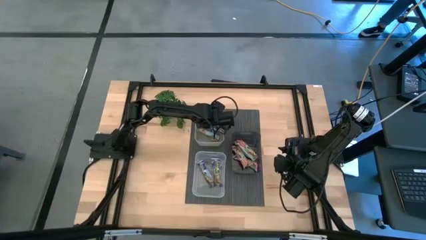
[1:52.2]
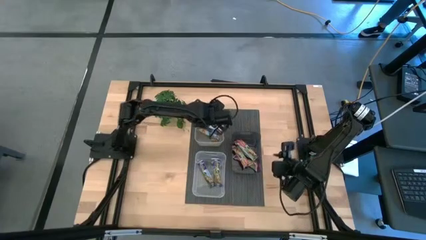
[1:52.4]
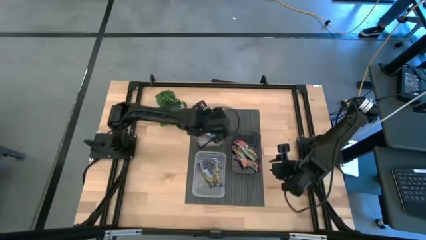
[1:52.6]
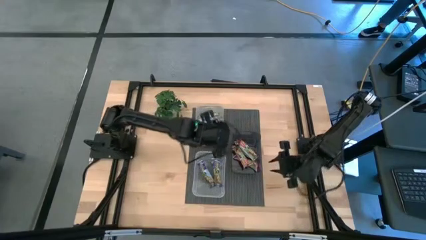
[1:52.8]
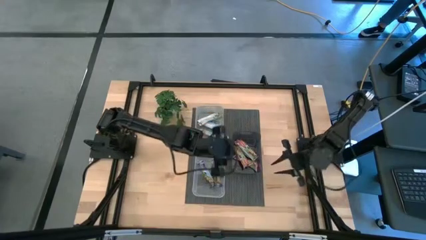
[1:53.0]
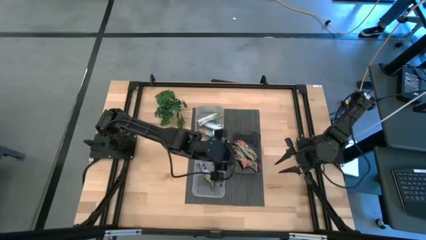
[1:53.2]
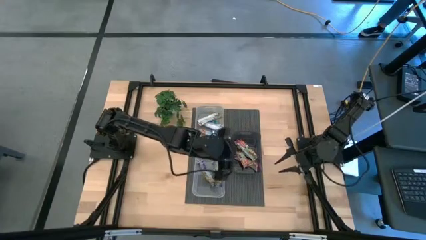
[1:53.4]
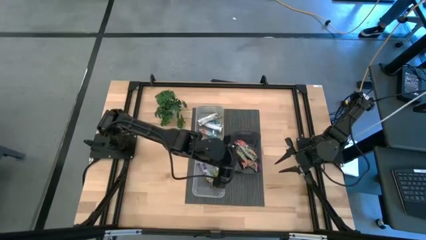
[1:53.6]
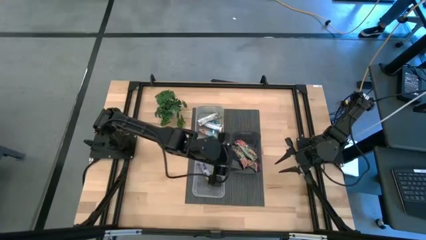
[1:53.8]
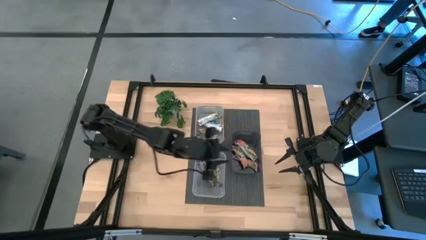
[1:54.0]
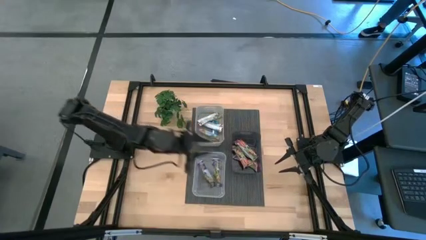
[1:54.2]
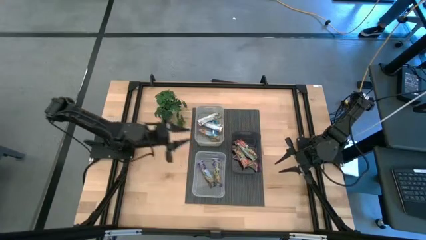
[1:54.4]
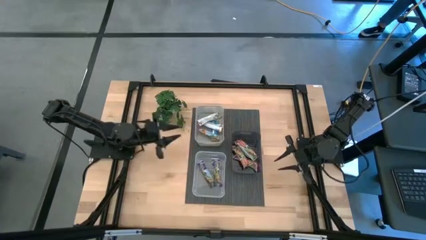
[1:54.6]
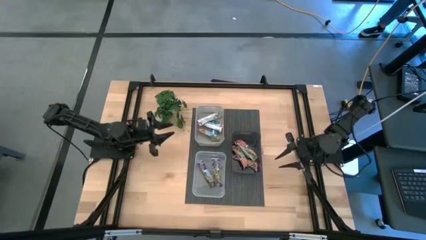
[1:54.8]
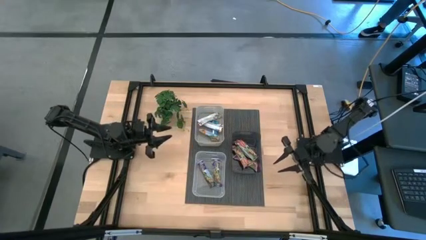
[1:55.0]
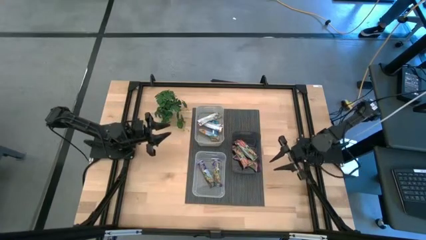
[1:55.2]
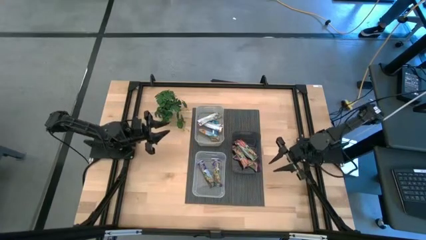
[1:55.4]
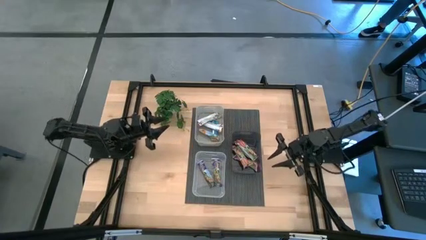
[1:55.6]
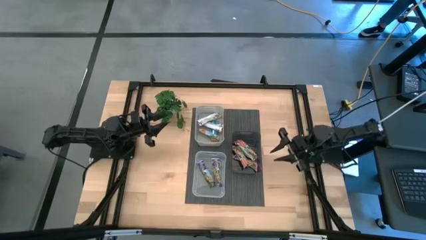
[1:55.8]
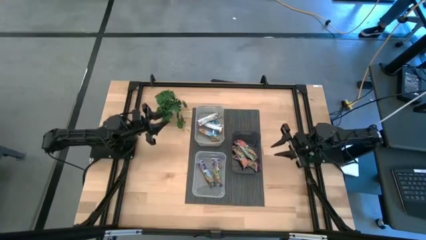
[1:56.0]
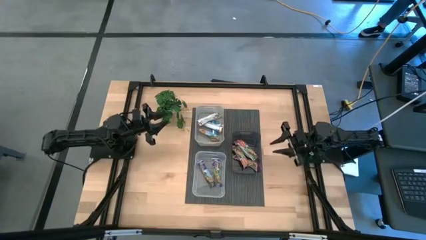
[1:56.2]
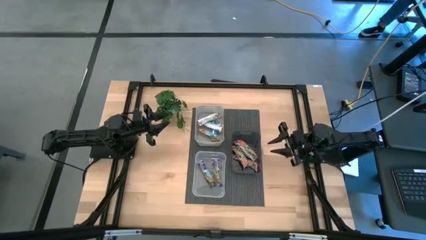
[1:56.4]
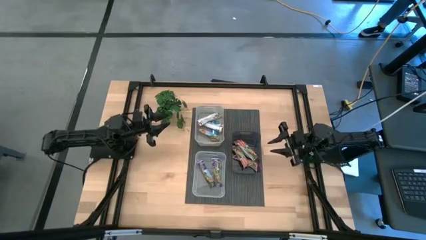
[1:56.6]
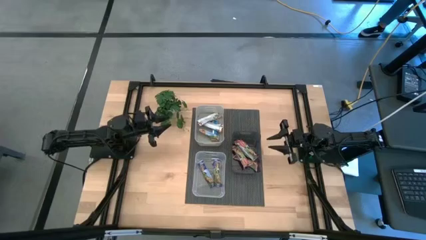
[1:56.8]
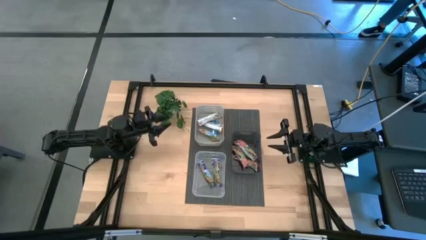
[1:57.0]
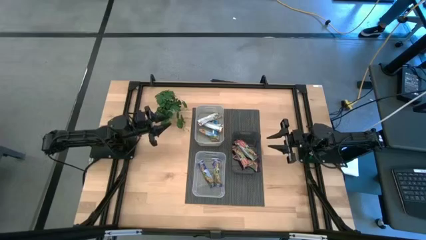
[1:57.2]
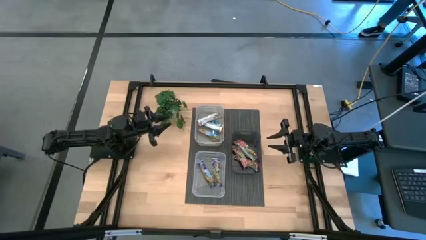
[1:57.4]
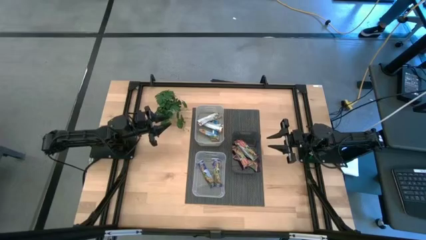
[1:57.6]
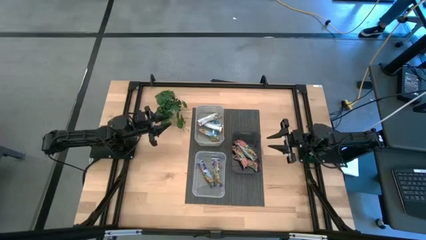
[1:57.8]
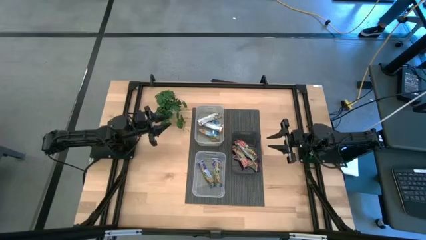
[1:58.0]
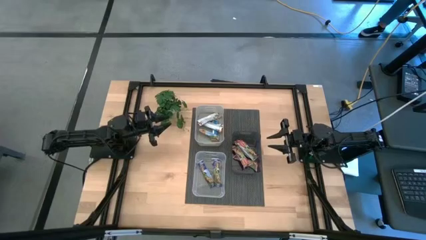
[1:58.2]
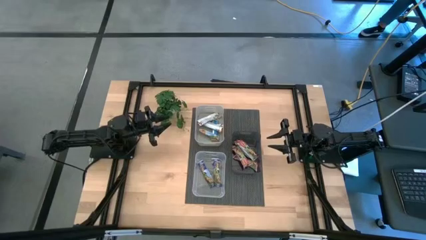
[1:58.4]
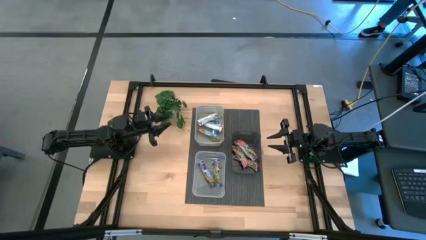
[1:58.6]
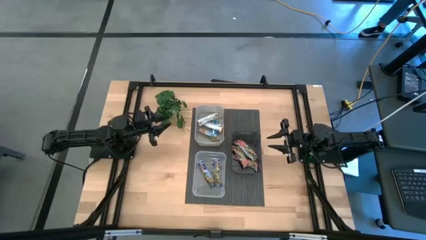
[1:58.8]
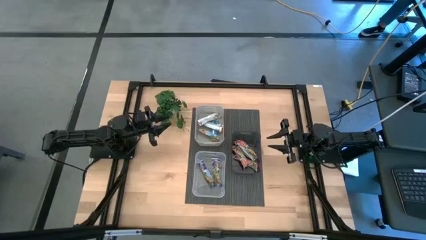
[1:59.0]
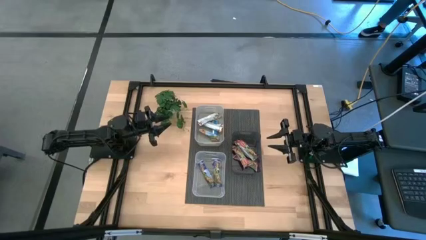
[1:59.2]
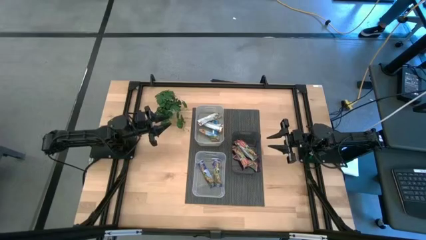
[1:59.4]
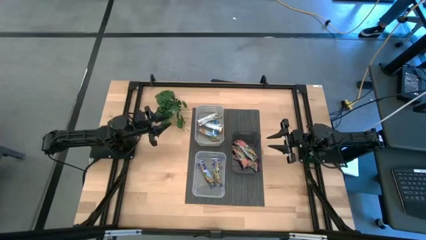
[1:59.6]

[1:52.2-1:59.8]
Task: Pick and place Granola Bars by type
Return to Home Position

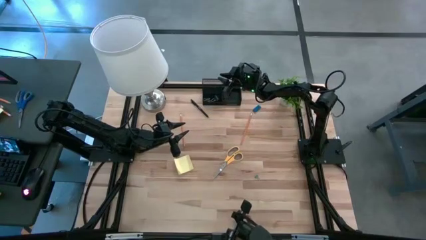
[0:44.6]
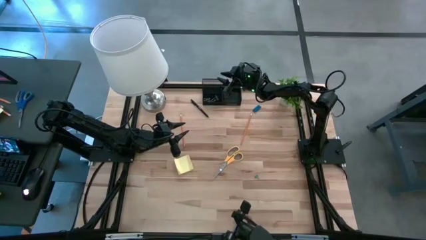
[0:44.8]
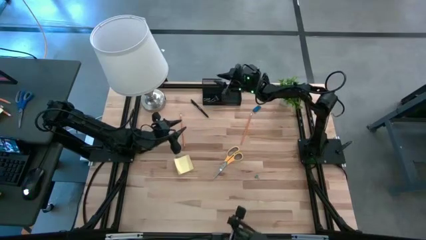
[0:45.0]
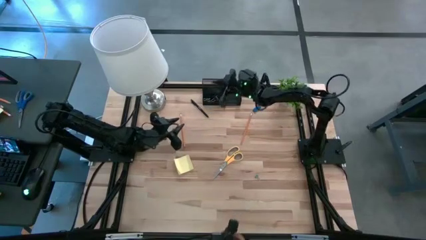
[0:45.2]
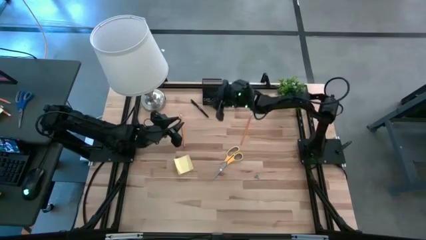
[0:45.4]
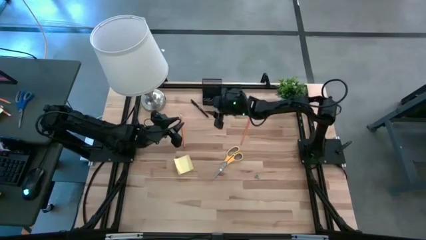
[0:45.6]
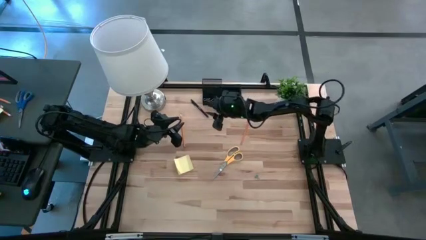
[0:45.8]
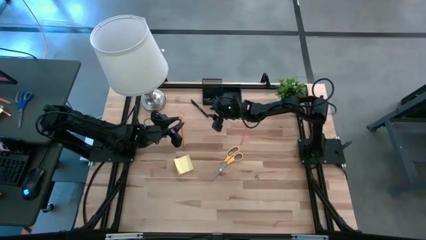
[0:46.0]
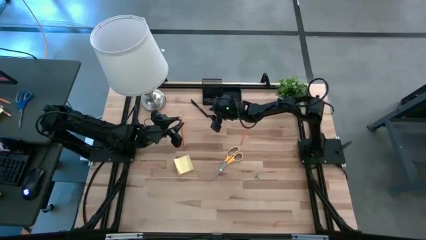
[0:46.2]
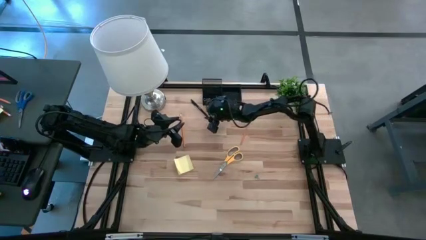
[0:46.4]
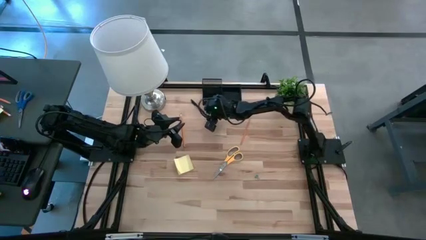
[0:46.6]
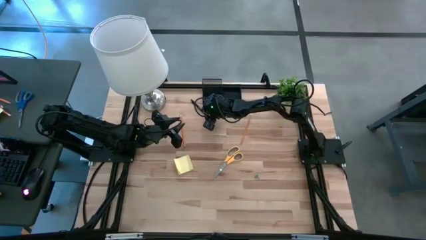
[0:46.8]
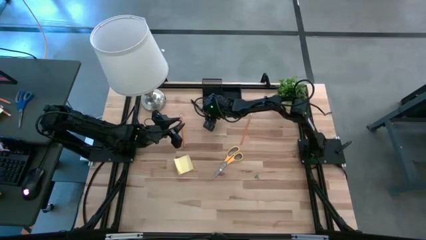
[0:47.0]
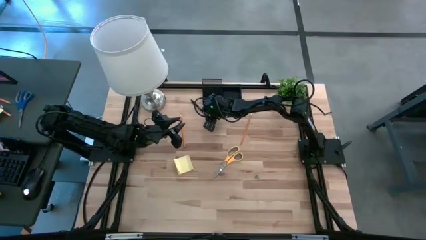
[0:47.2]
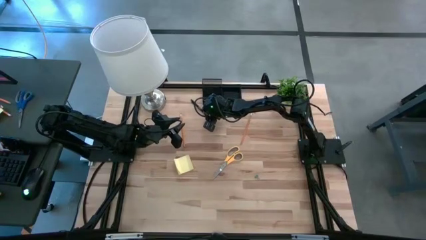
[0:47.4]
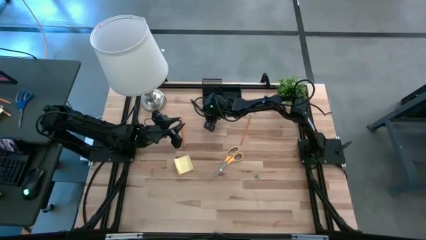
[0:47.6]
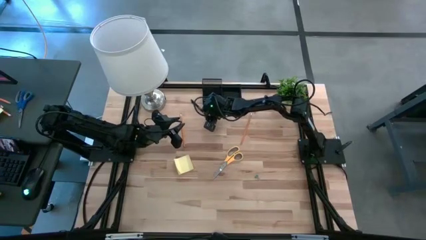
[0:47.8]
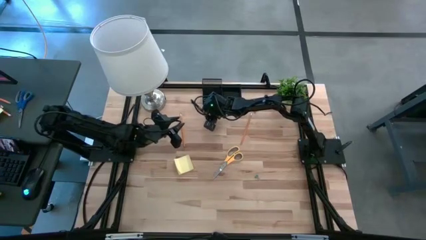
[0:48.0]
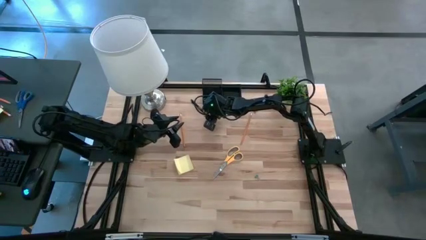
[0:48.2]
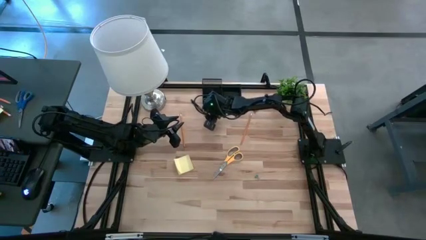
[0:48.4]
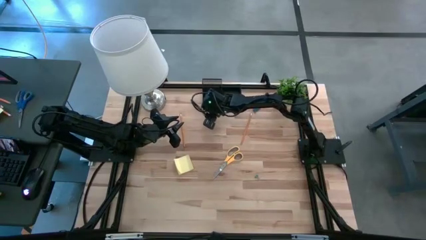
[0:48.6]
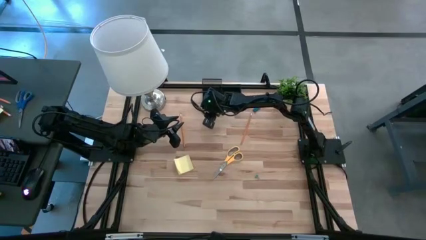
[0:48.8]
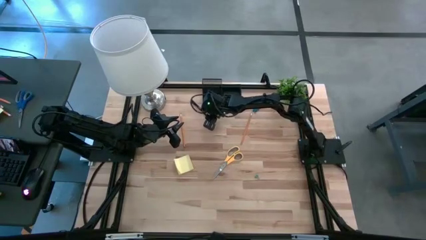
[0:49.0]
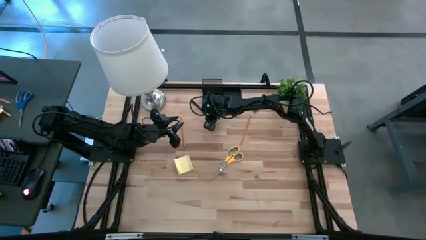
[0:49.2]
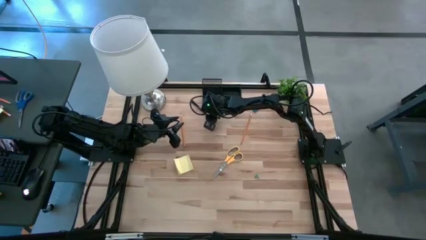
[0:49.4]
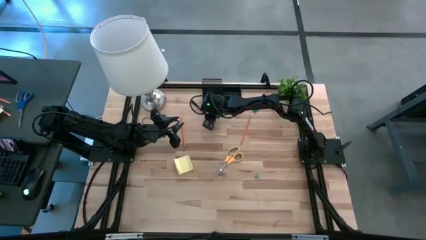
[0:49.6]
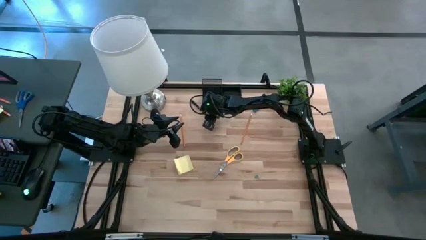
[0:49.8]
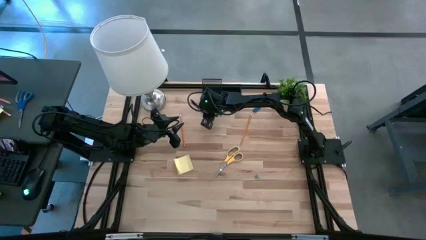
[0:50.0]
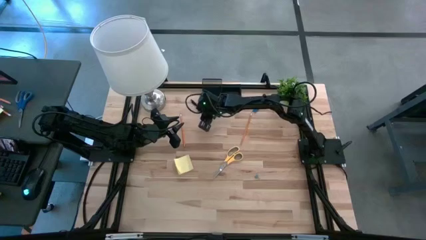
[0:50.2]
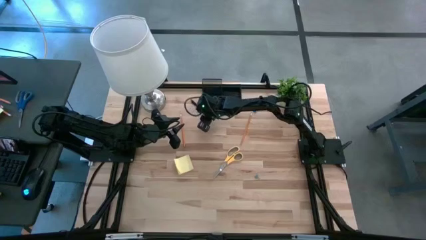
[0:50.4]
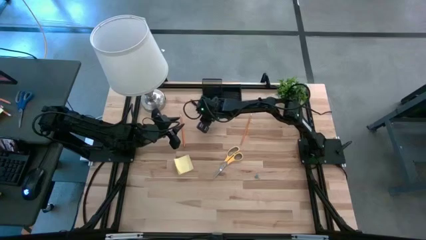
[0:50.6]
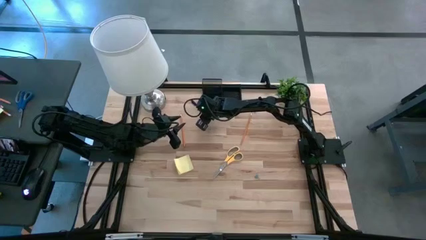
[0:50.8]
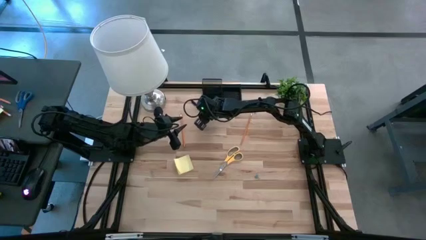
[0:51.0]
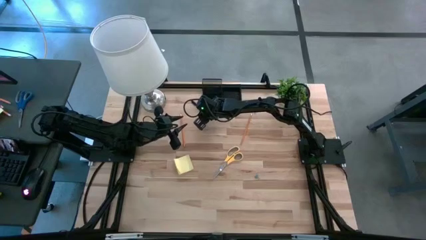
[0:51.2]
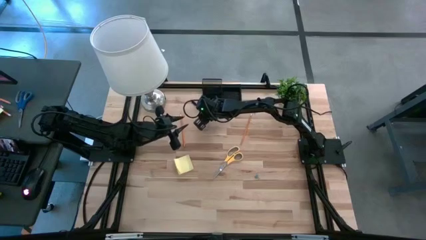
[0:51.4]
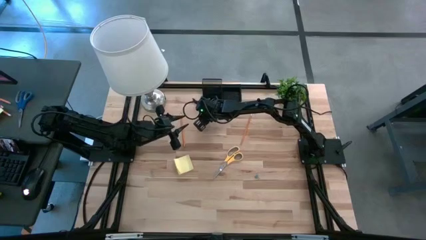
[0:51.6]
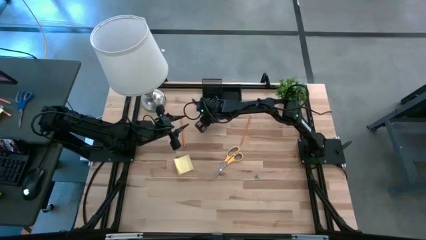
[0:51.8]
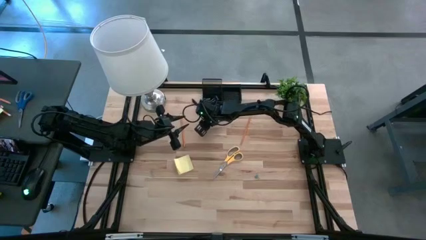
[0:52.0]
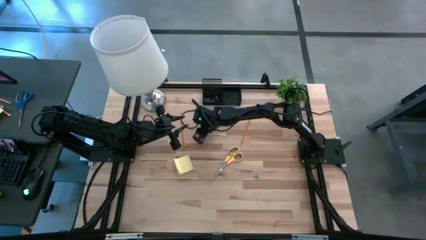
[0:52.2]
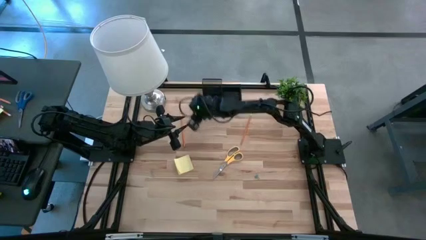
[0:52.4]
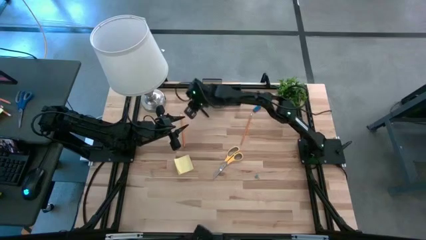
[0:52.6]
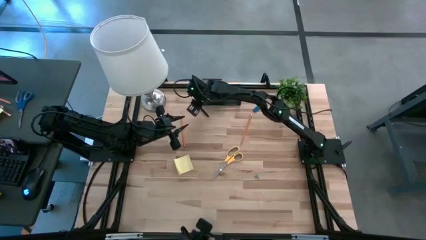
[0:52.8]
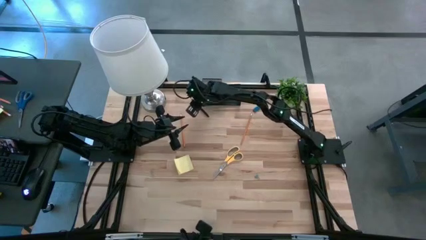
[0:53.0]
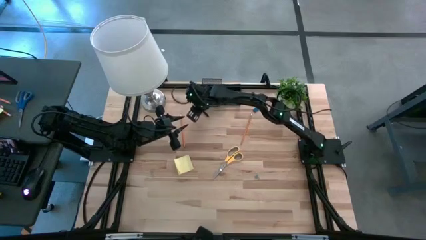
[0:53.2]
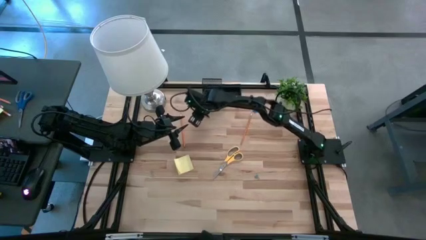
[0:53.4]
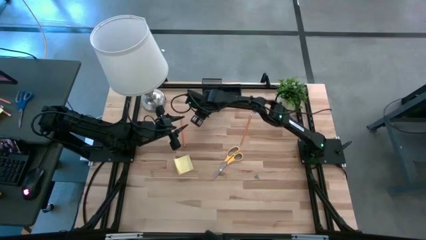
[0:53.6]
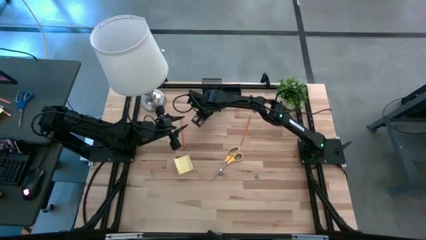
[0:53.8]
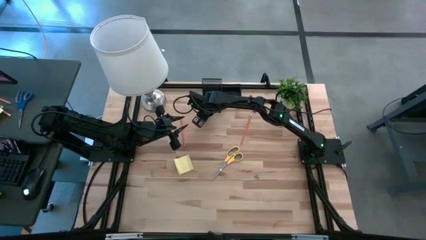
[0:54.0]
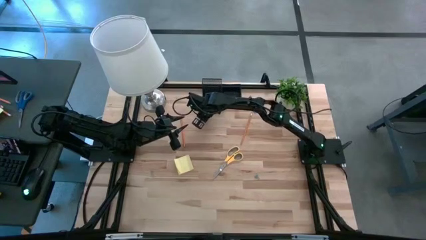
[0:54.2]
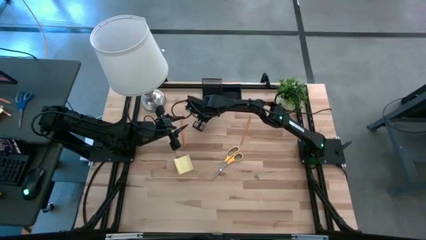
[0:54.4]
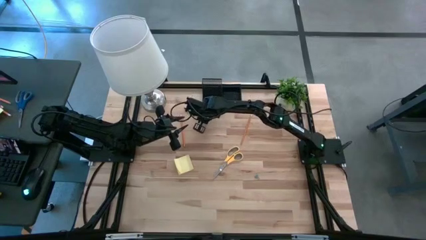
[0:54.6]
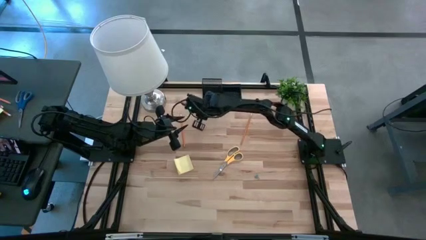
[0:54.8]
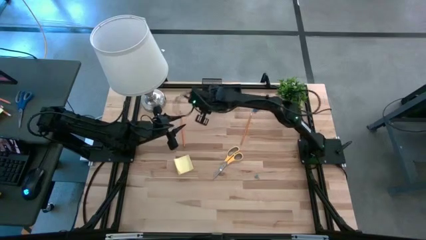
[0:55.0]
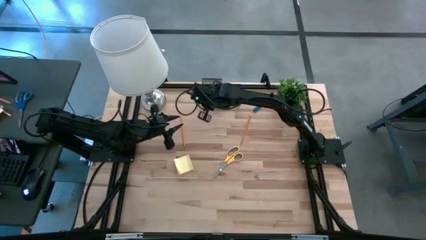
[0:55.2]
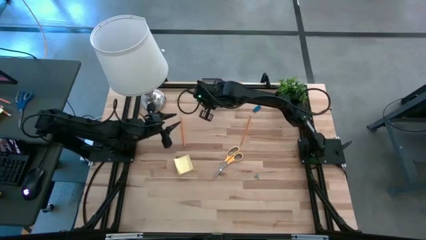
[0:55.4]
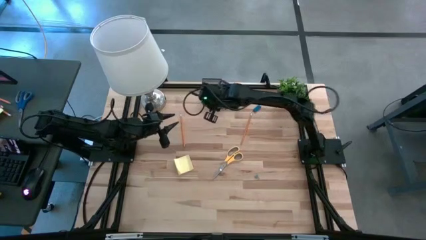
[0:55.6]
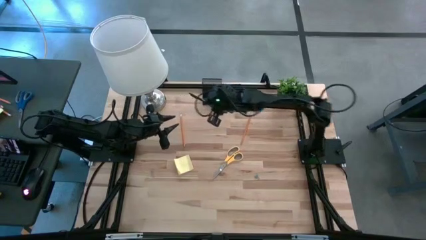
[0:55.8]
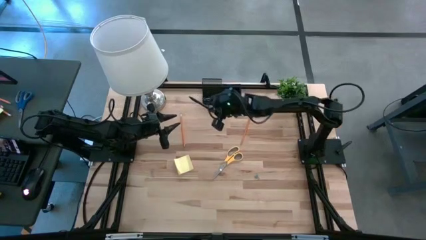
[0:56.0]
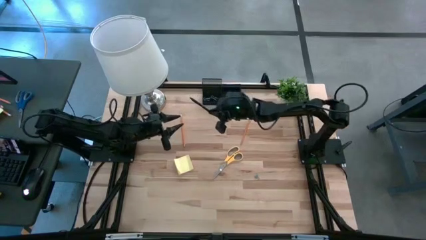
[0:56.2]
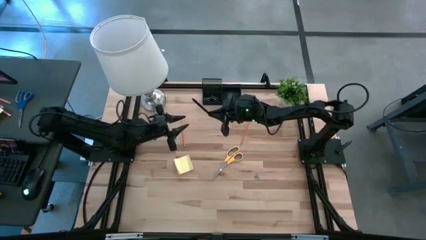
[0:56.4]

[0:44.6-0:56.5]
Task: Pick and place office supplies into organizer
Put the pen into the desk organizer
